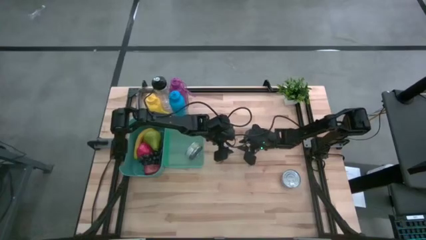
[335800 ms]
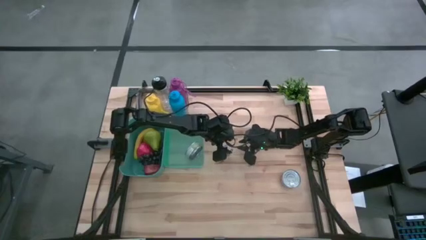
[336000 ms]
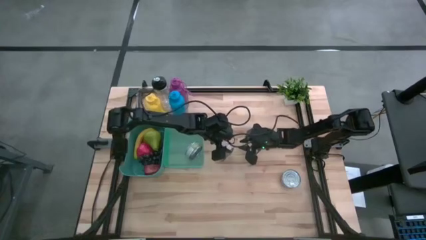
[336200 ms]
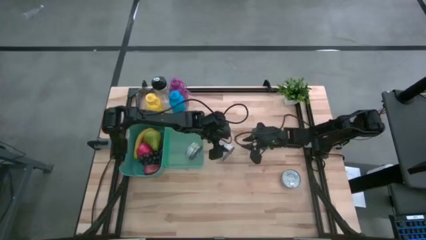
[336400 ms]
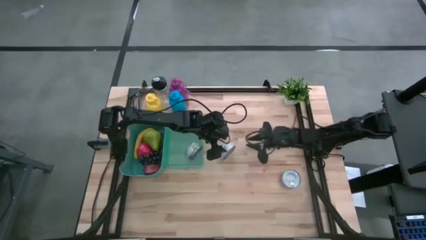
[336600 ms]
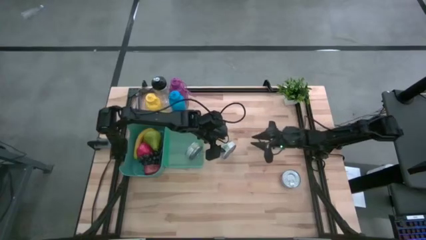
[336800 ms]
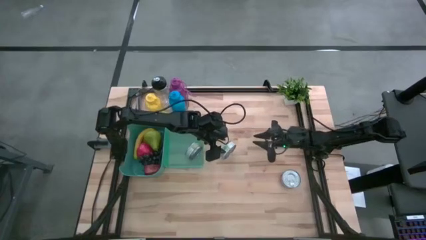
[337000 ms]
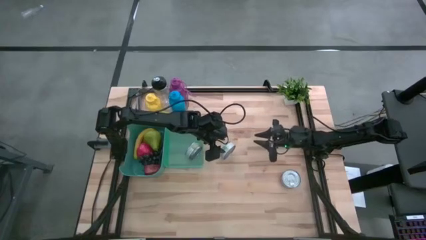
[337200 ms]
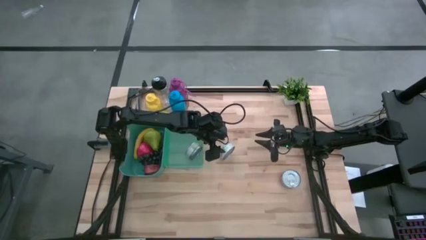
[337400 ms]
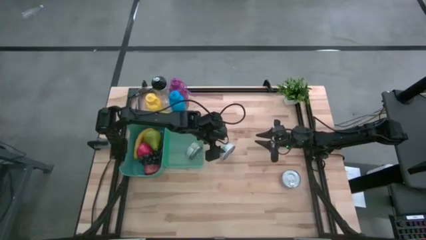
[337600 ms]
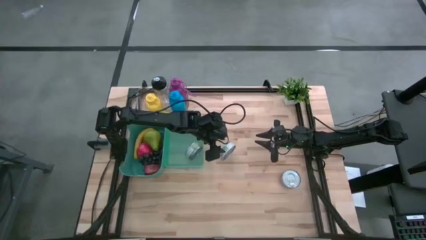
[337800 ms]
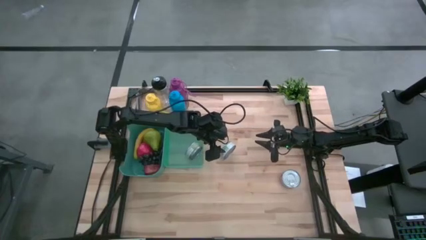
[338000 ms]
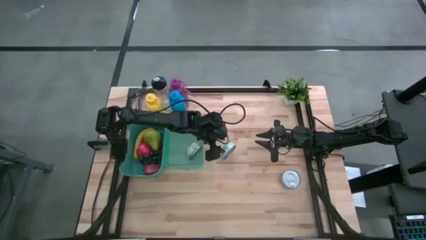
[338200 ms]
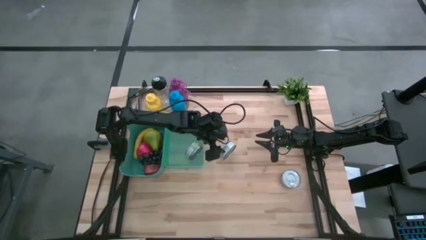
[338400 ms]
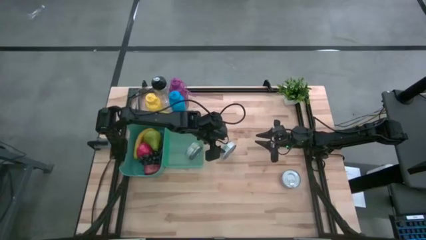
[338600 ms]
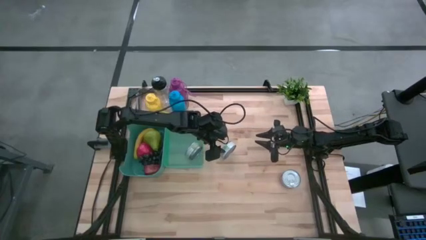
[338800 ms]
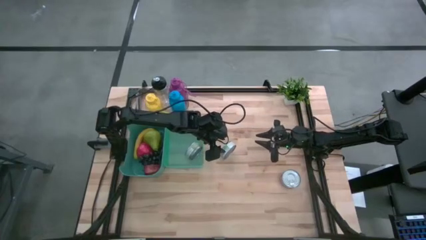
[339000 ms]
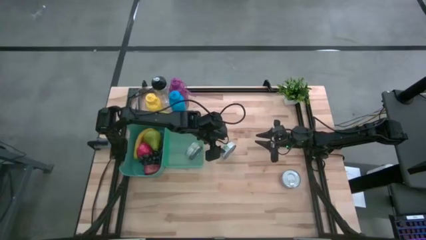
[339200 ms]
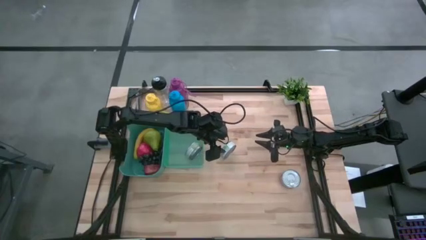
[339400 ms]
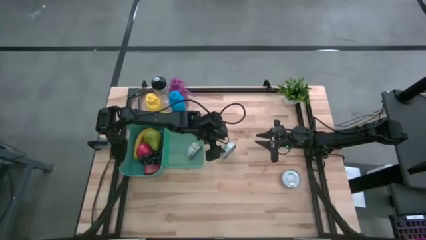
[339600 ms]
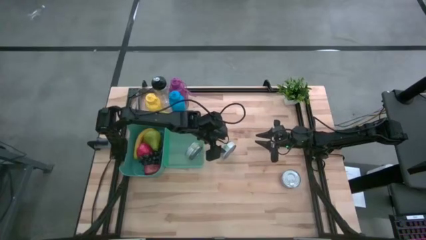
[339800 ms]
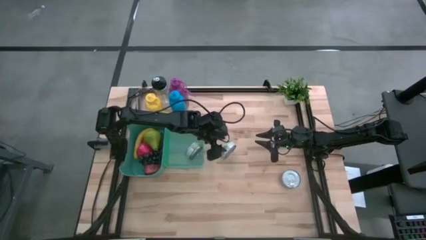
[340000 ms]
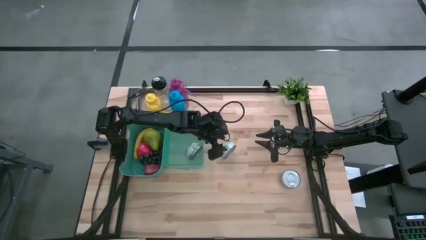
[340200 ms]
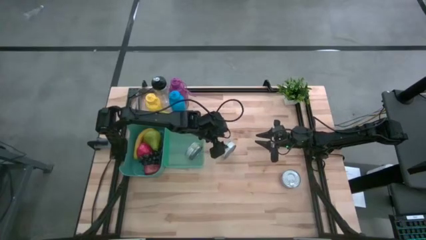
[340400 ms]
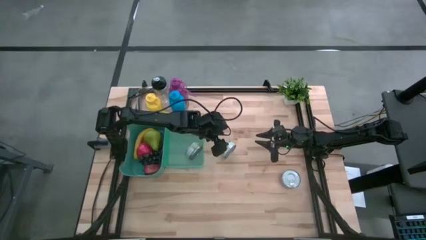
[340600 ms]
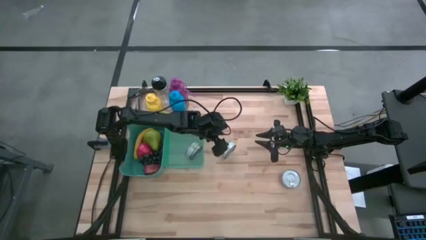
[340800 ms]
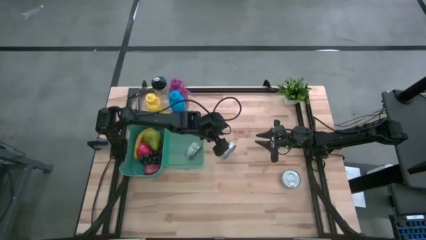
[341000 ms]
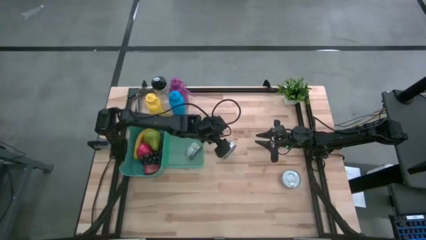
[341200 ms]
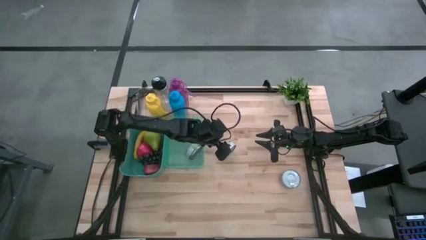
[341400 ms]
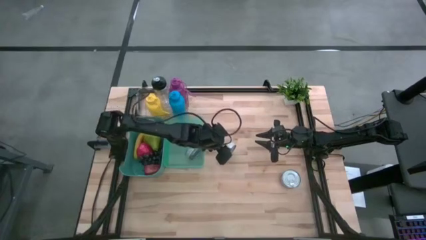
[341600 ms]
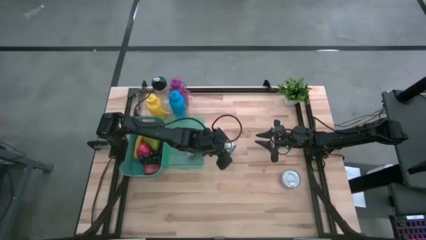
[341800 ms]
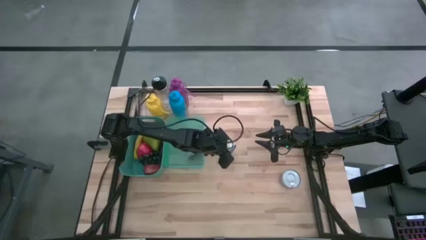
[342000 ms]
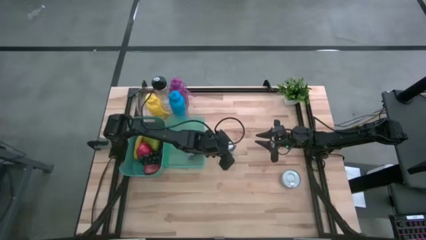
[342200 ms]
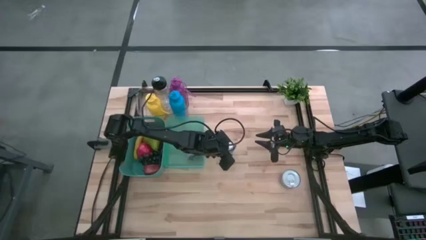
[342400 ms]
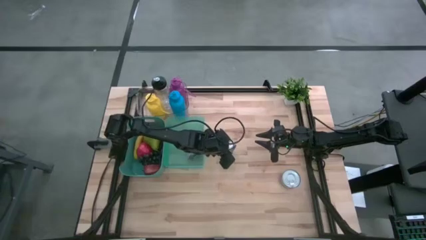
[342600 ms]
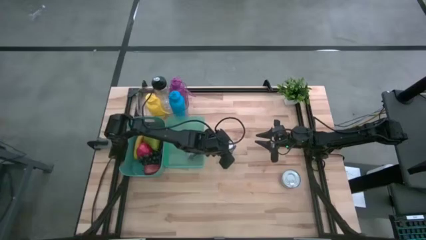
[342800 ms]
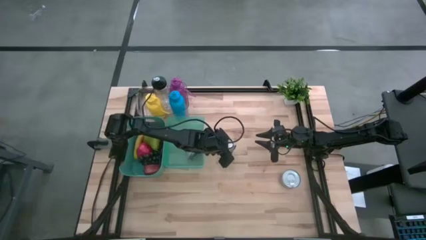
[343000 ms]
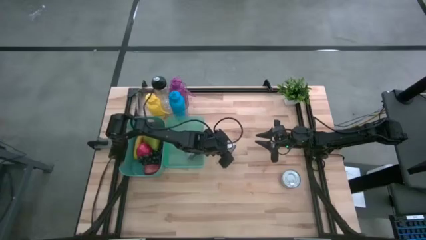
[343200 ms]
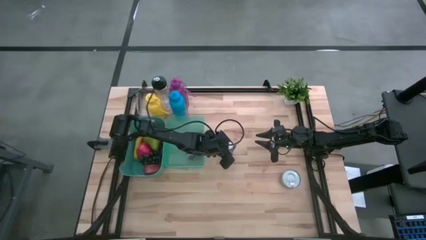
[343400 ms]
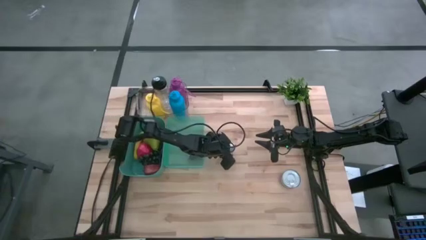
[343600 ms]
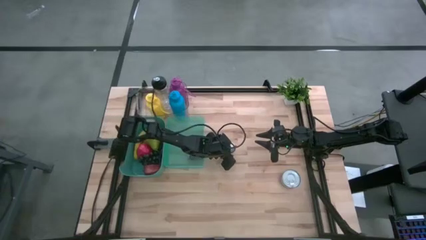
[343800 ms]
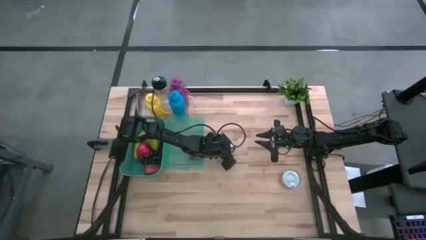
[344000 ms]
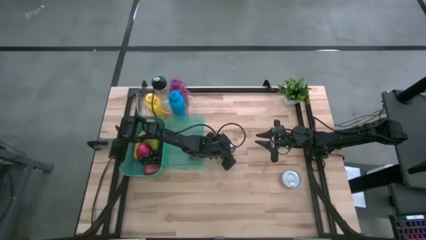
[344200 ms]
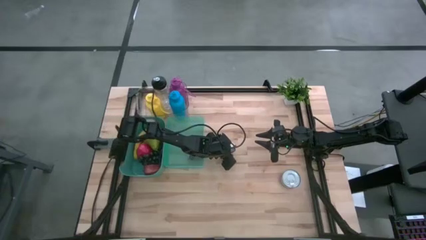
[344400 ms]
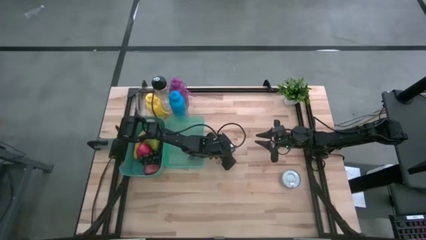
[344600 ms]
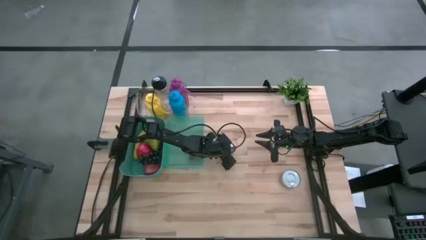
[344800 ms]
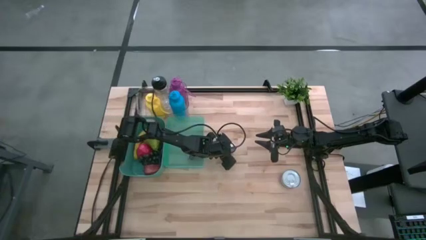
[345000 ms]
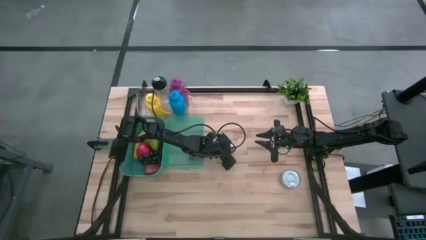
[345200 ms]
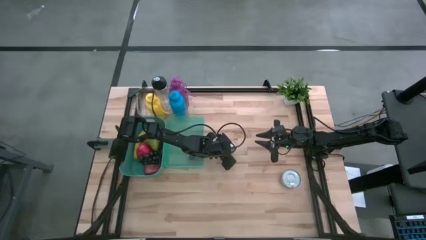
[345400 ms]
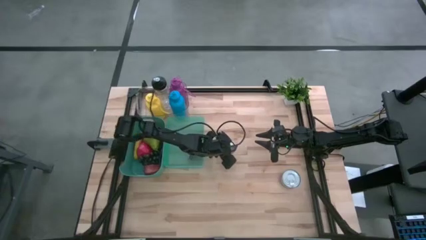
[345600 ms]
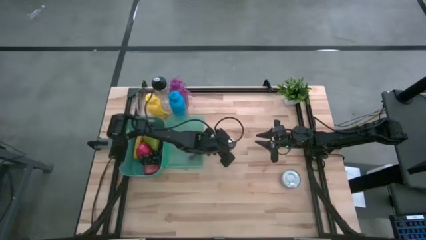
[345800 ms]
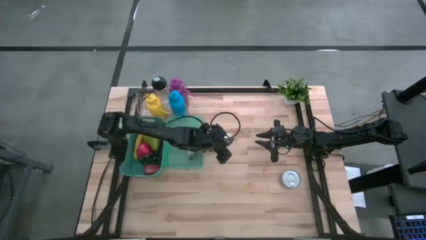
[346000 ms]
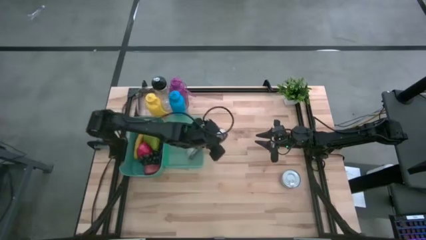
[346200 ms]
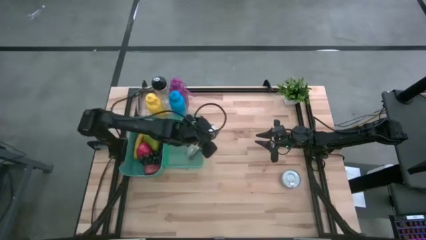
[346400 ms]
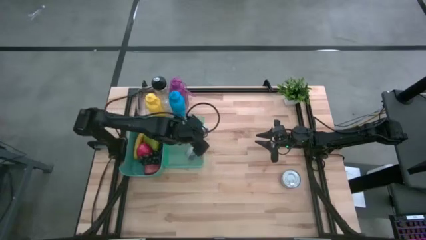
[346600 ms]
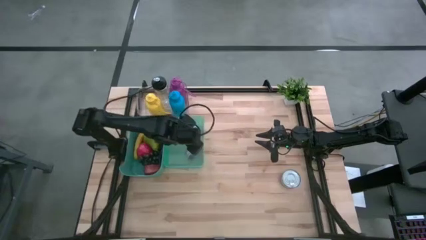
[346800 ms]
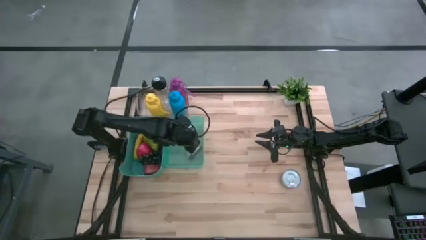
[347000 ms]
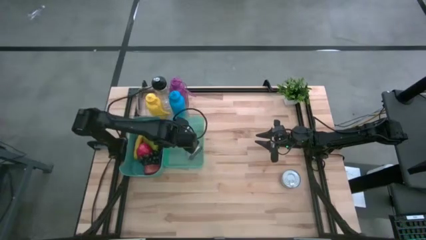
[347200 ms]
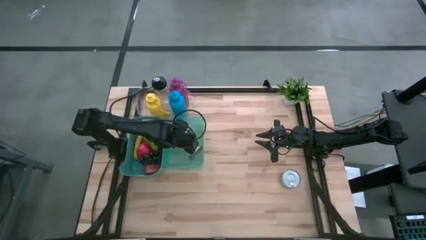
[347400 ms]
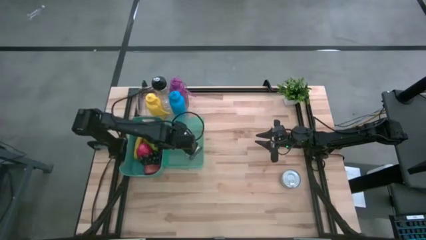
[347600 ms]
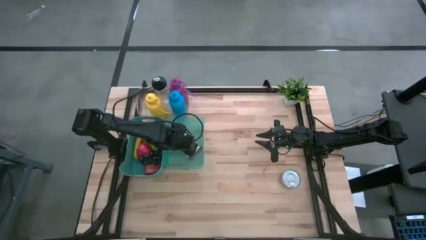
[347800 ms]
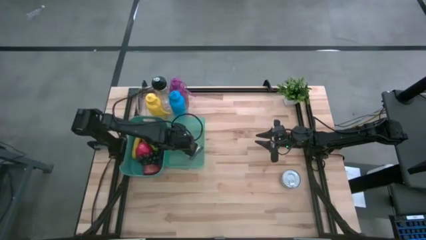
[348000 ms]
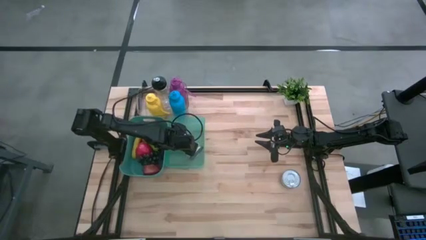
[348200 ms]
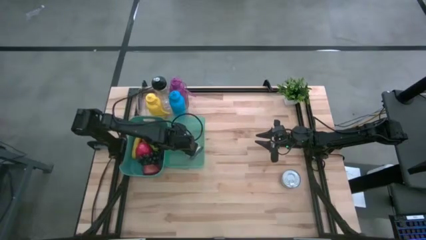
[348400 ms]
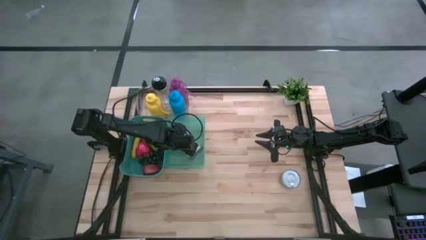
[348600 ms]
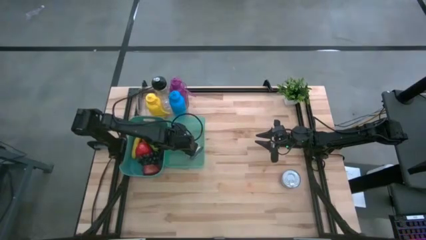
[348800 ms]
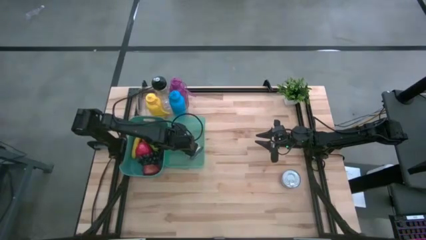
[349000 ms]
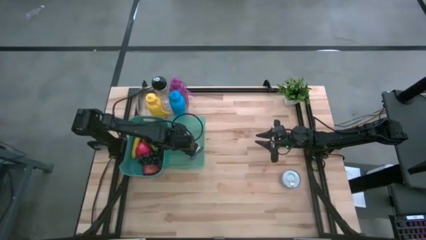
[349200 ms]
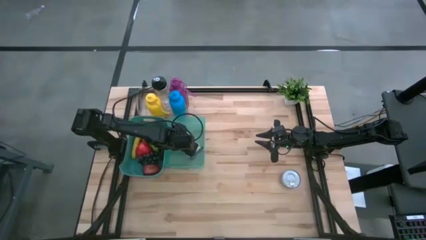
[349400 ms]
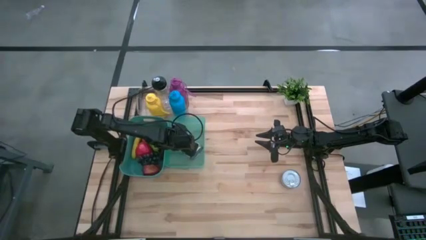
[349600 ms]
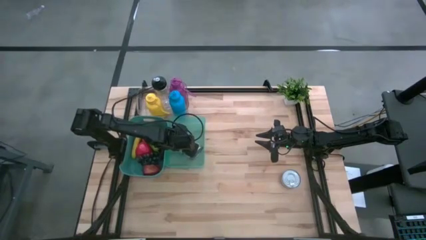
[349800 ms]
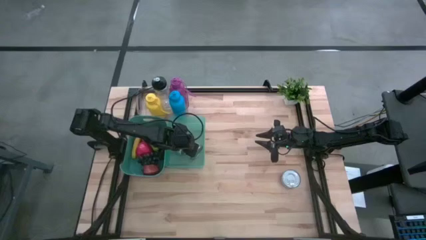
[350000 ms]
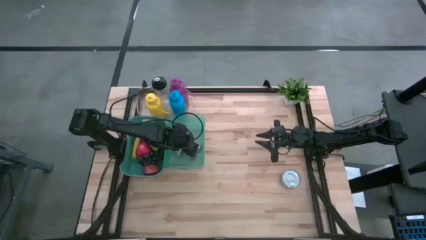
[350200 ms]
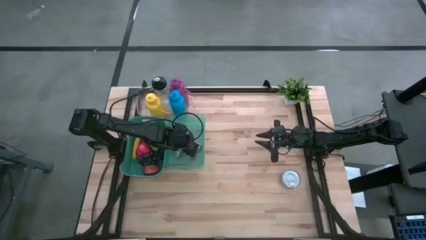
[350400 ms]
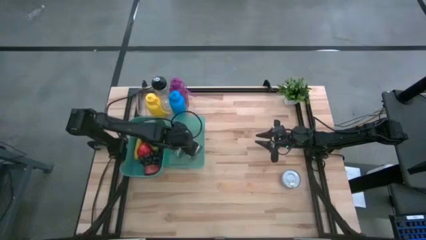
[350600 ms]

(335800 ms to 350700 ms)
Task: Pick & Place Food Item
Put the green tuna can into the light green bin
